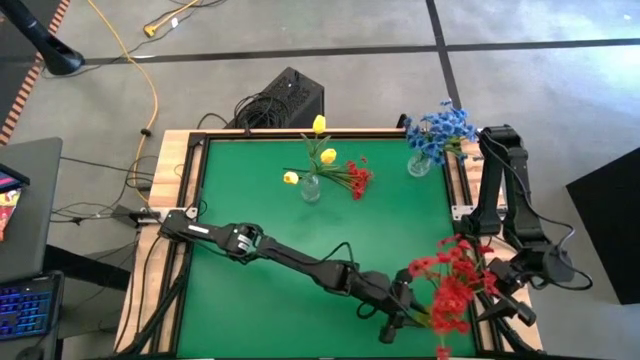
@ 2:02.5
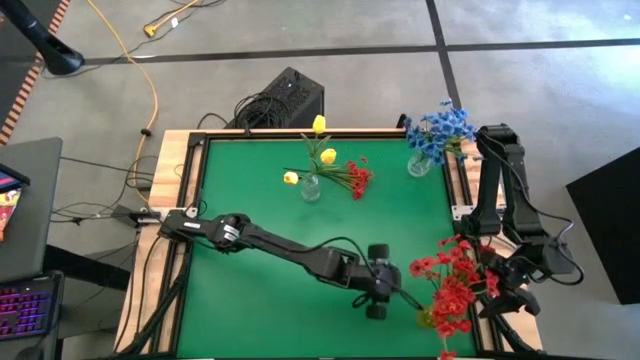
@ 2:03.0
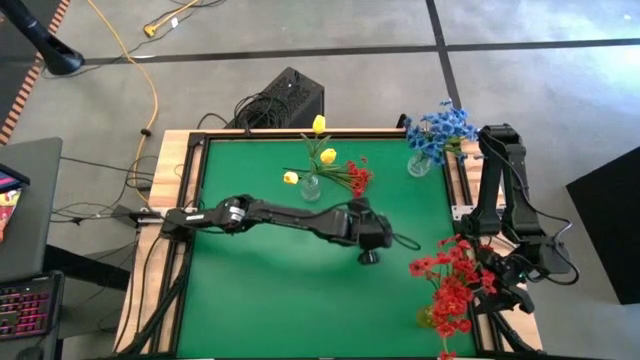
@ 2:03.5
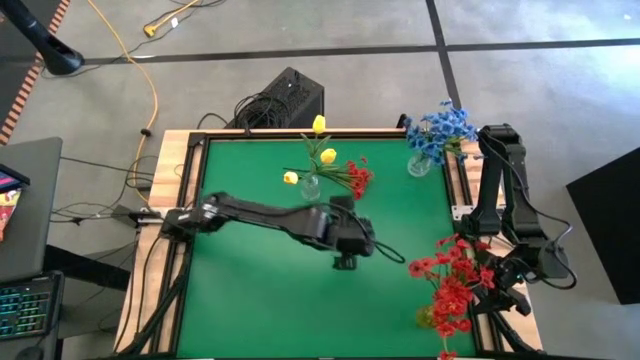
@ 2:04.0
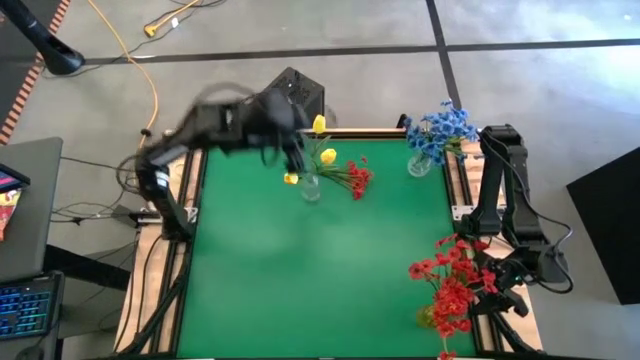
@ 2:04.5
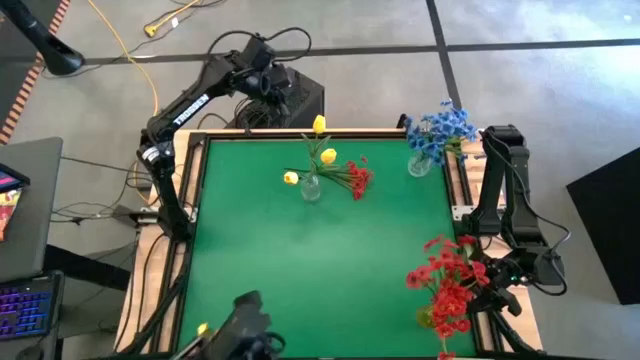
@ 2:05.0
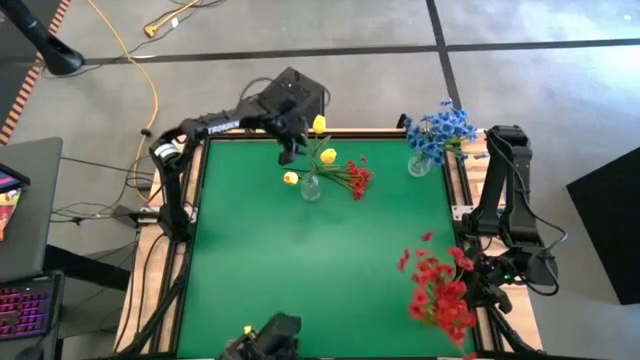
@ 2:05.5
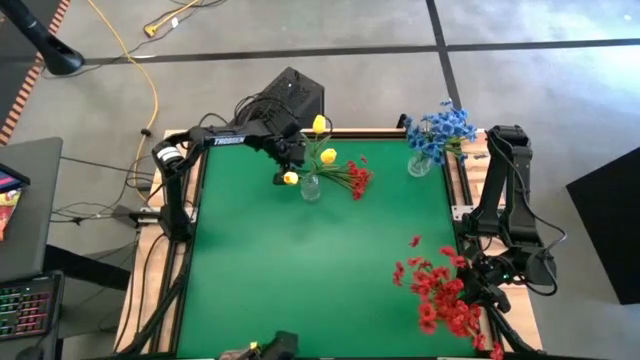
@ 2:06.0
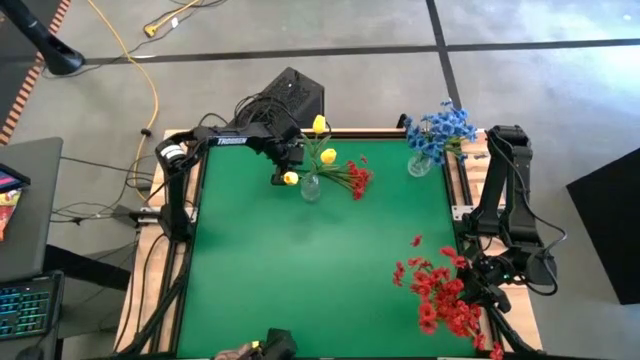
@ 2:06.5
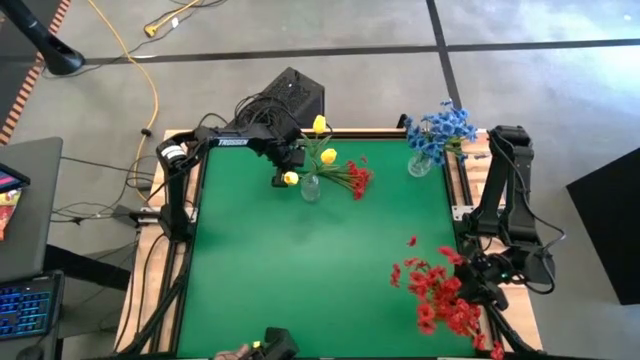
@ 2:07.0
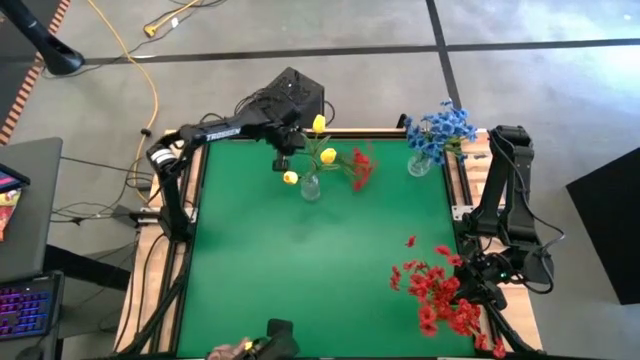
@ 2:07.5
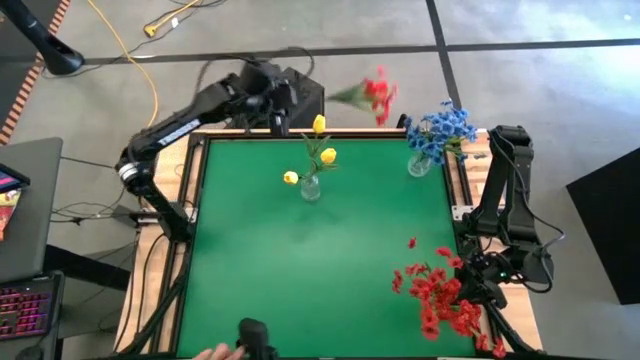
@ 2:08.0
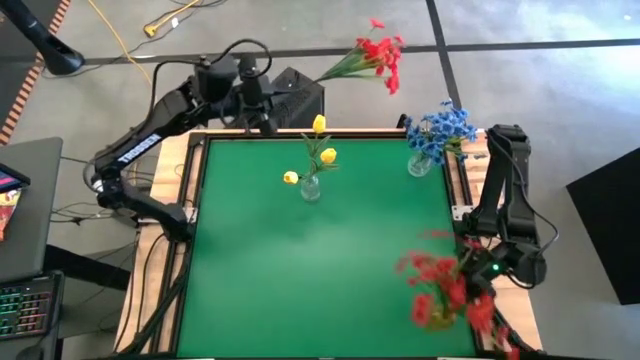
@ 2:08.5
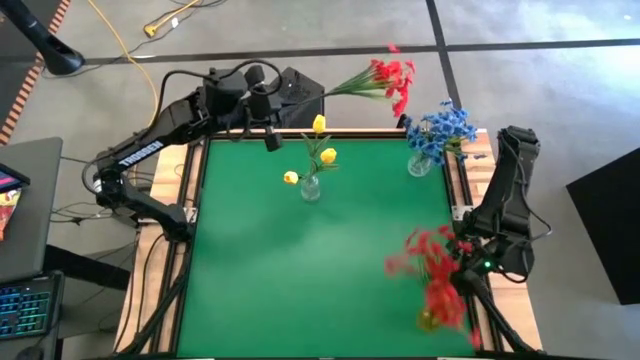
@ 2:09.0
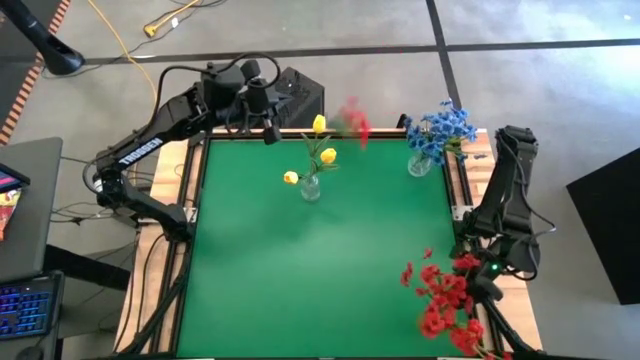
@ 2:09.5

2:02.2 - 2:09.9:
Task: Sort flowers into vase by color
Put the red flowers into the yellow vase

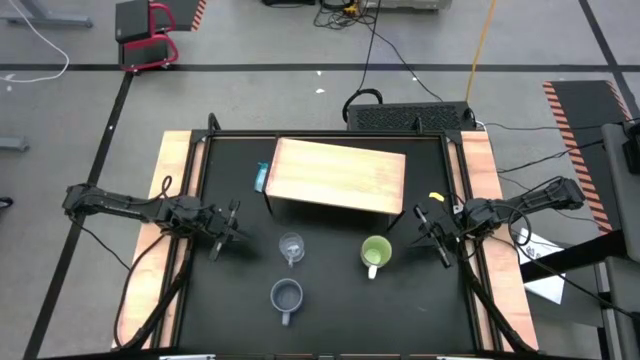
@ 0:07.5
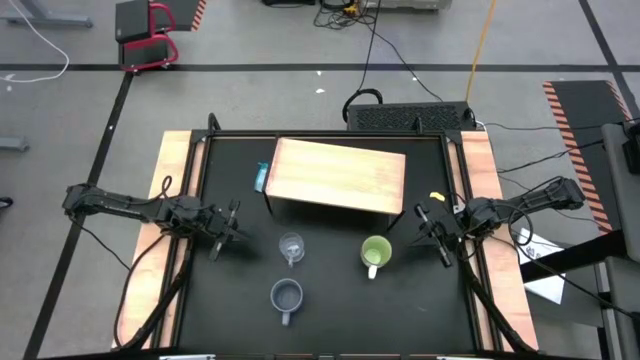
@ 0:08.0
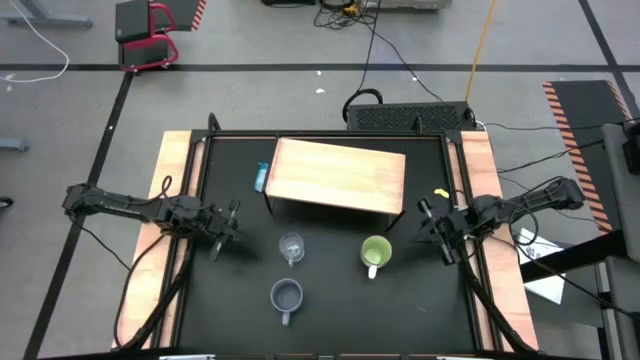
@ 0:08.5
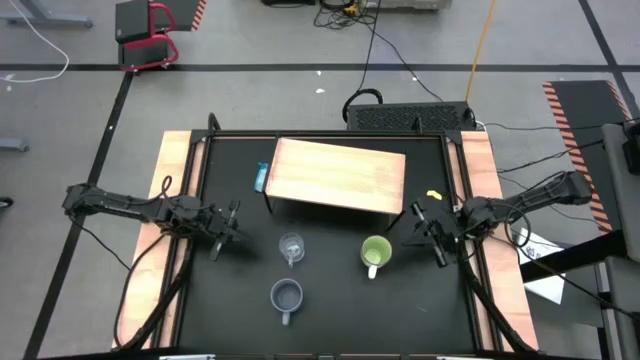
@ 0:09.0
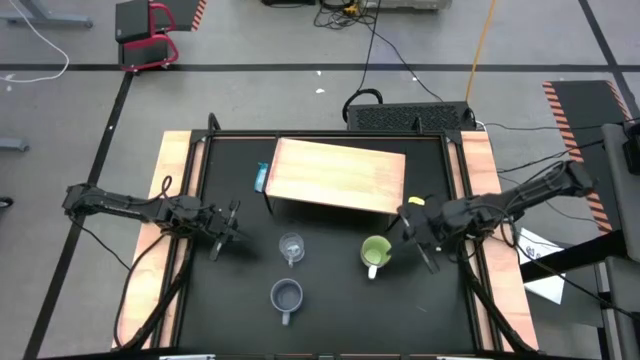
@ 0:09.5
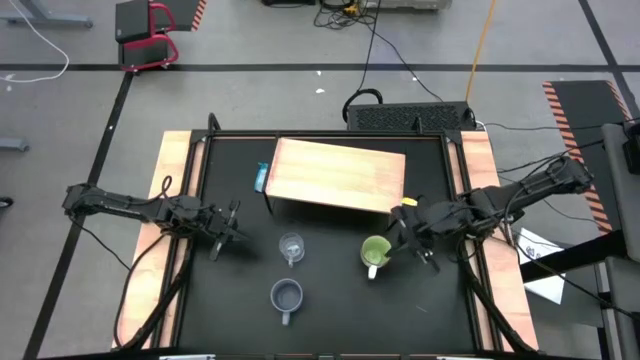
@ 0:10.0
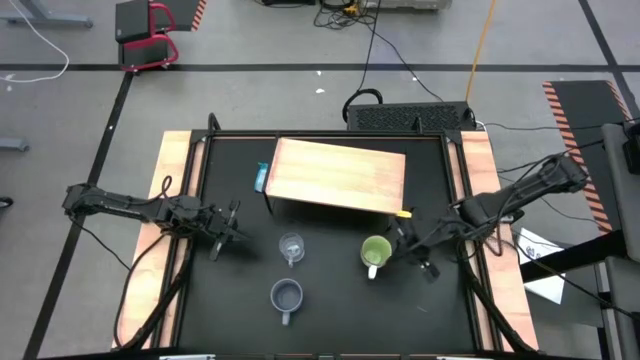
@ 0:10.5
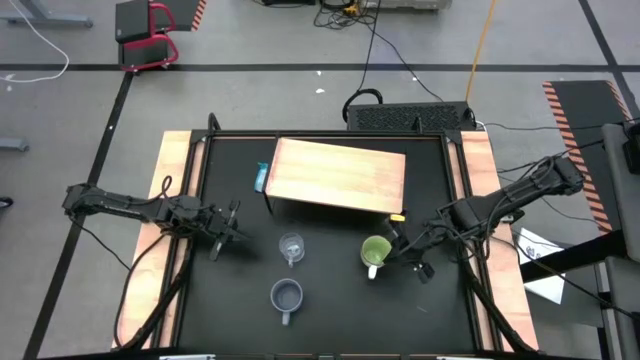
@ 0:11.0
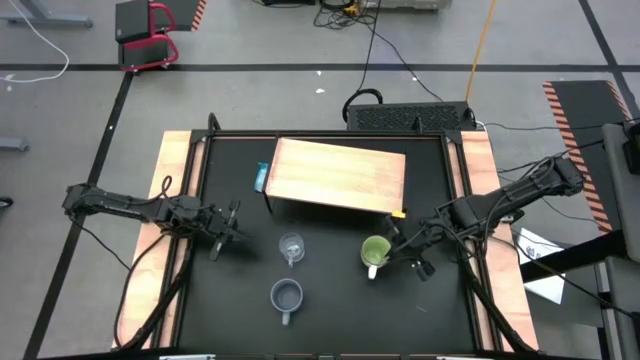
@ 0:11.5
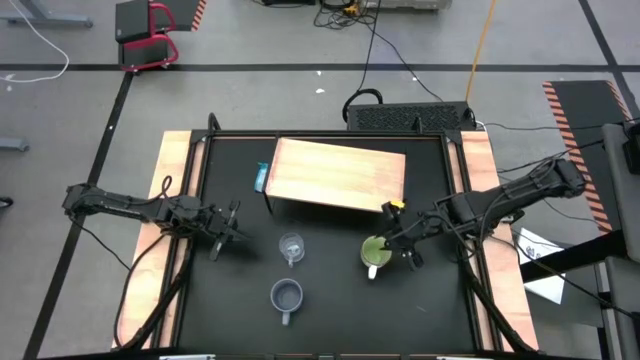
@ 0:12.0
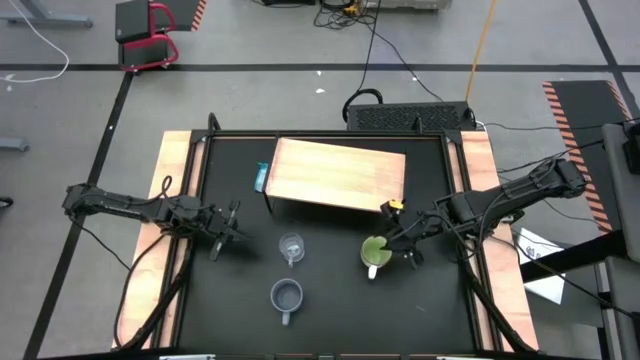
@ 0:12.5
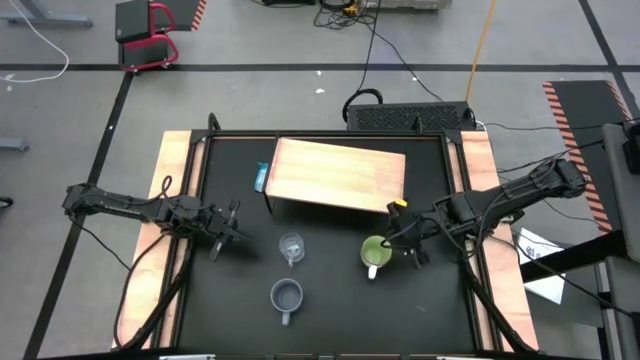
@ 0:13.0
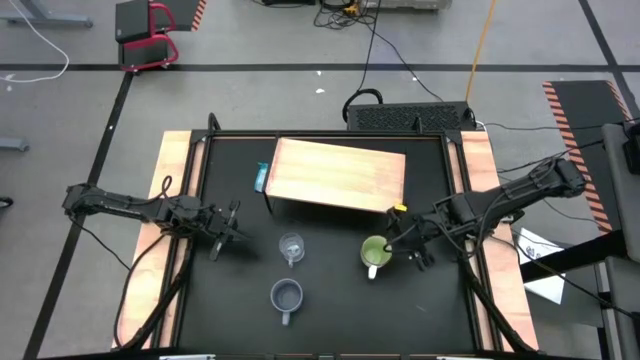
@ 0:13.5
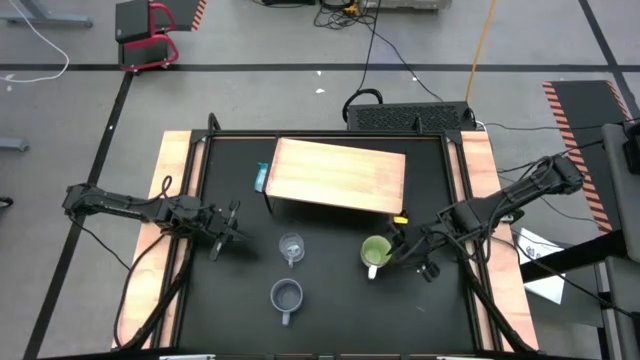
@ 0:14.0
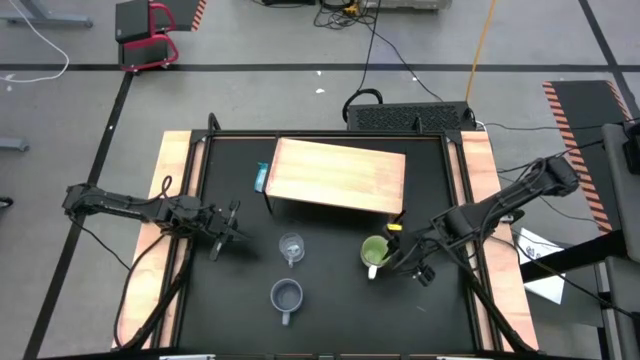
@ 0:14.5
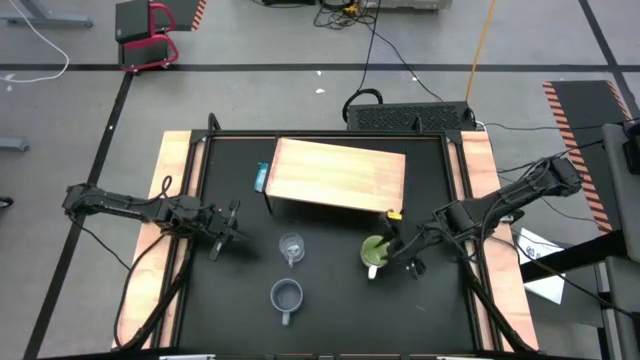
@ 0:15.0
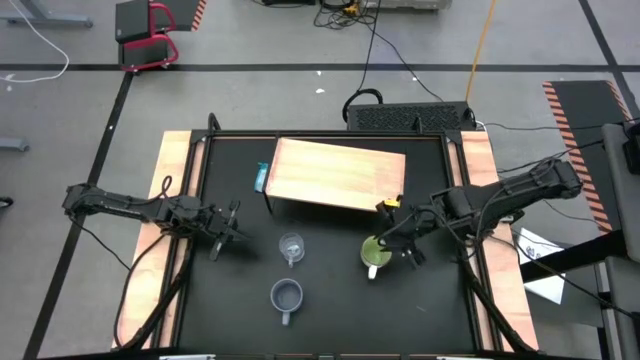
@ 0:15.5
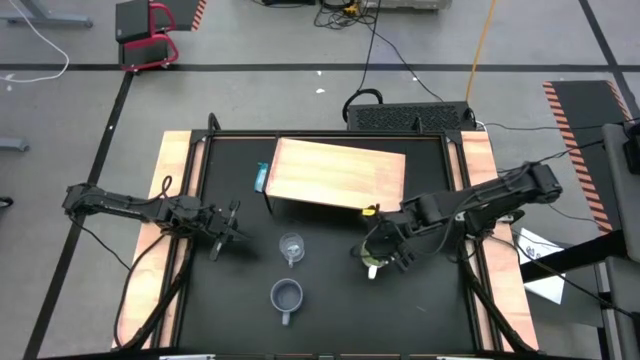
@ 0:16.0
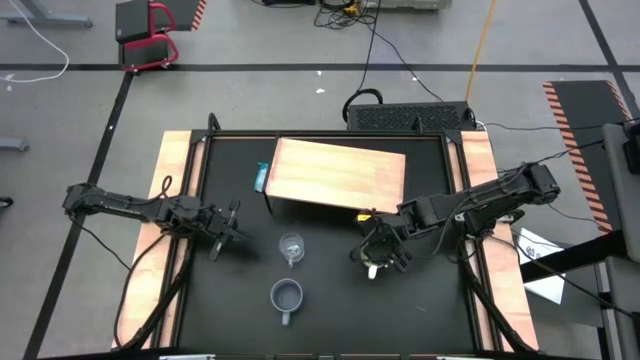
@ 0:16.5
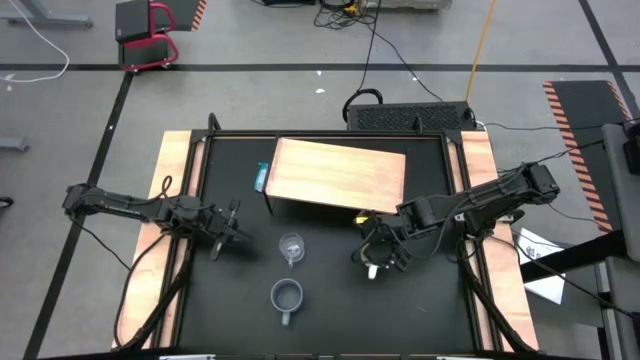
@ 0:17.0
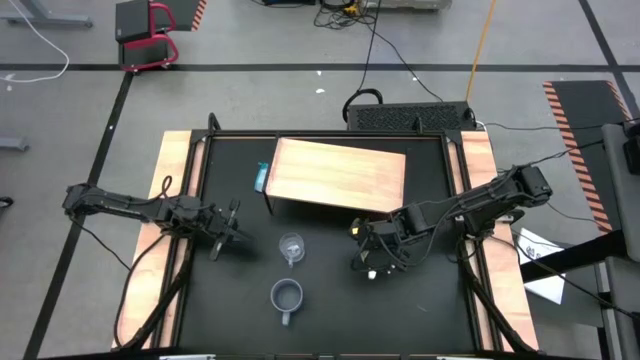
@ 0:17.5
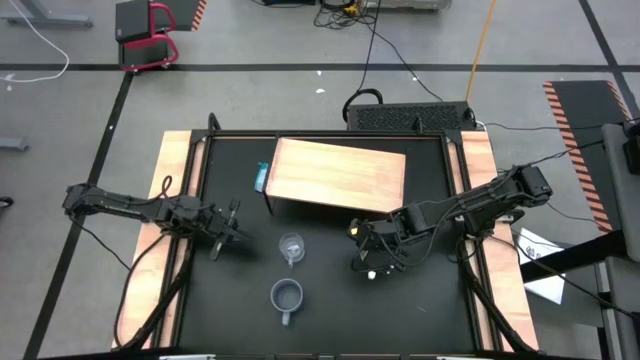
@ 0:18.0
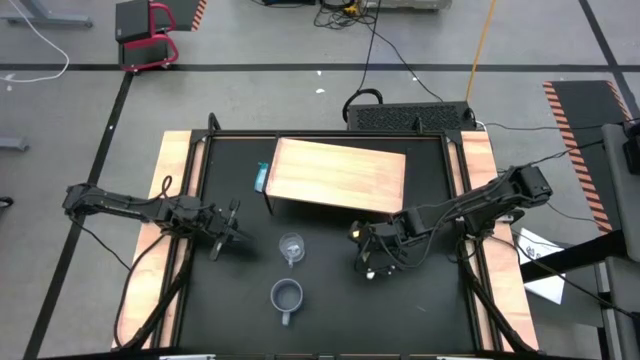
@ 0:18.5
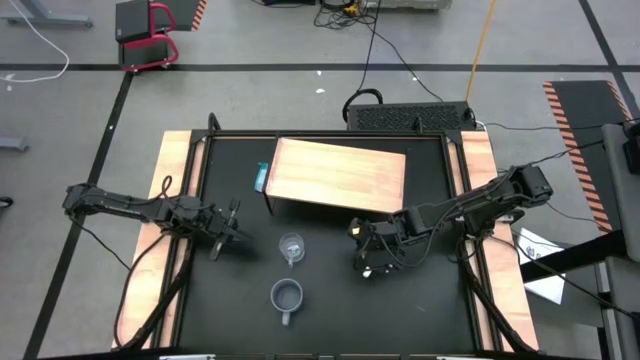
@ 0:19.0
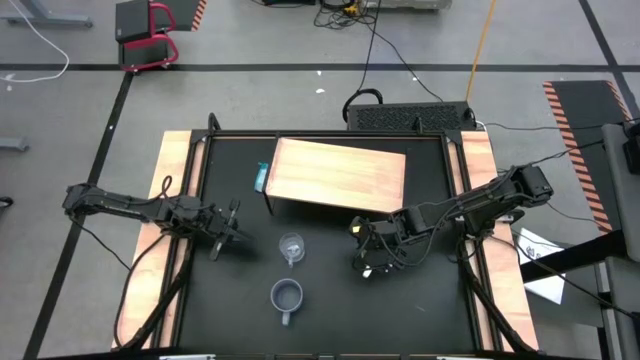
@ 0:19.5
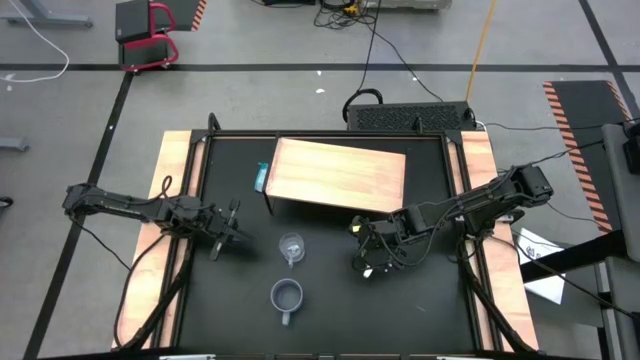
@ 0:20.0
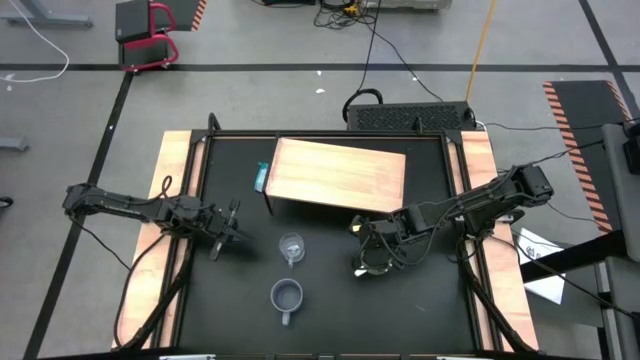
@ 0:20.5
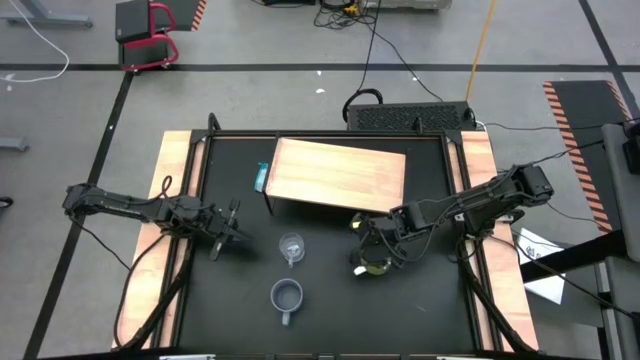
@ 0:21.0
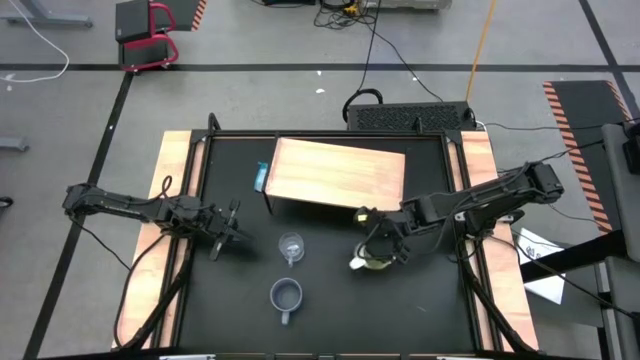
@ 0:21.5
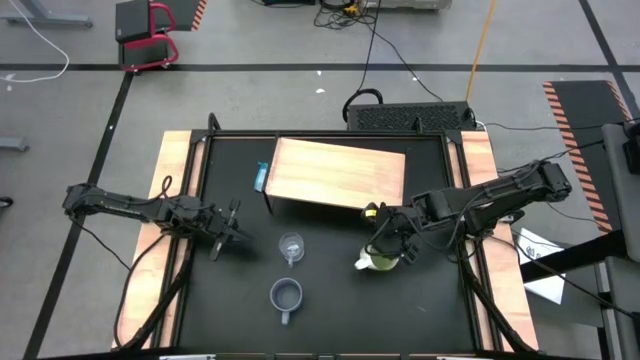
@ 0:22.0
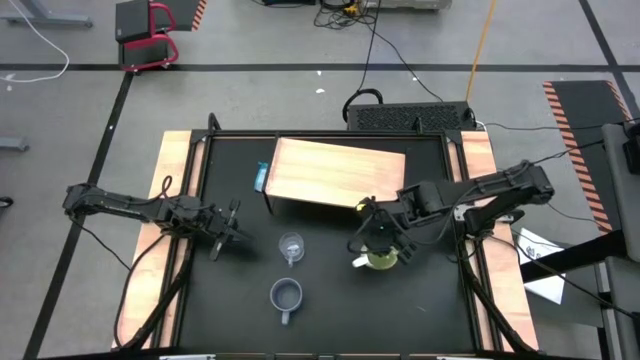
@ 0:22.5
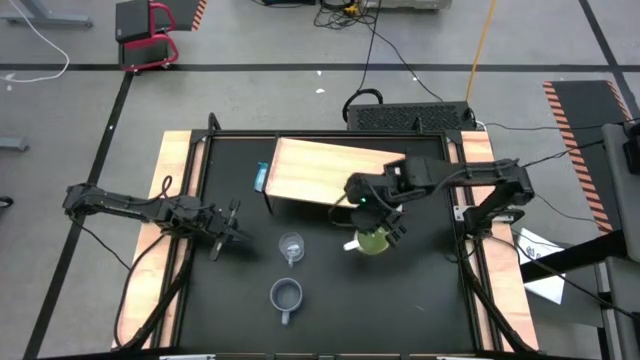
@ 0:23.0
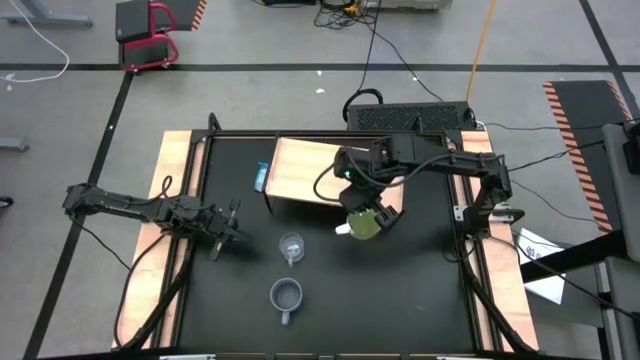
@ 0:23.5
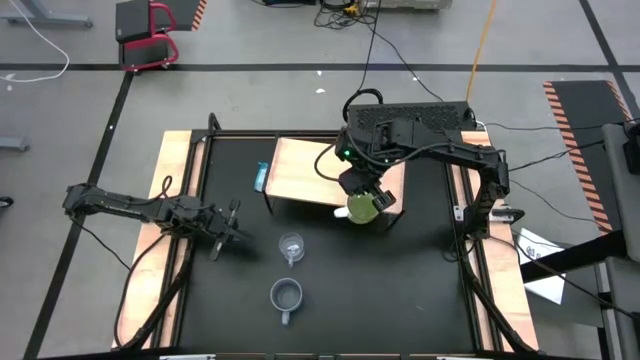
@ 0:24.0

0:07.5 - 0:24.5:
Task: Stack small to large cups/mugs on shelf
Put the green cup on the shelf
